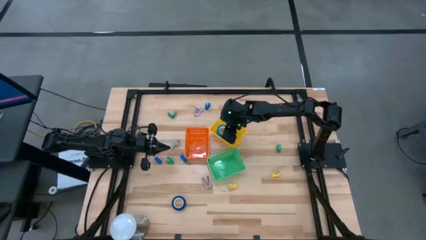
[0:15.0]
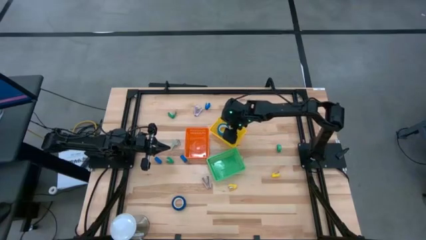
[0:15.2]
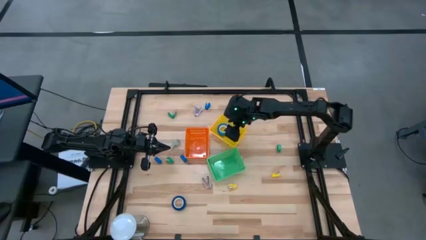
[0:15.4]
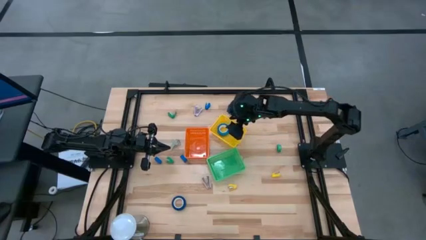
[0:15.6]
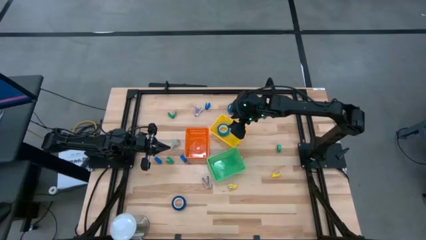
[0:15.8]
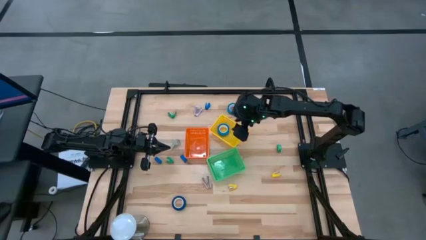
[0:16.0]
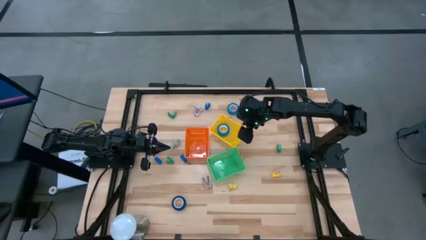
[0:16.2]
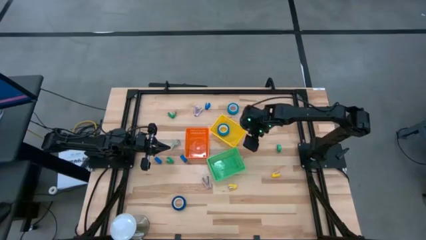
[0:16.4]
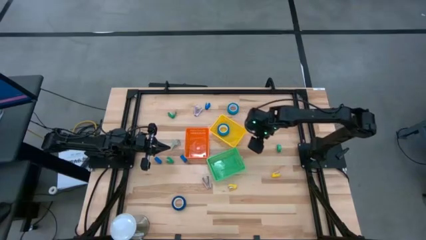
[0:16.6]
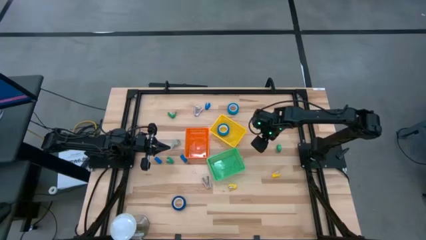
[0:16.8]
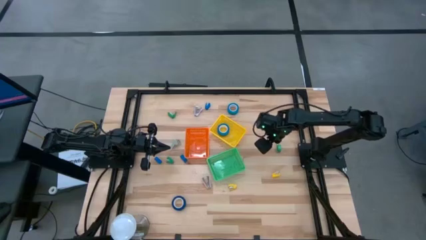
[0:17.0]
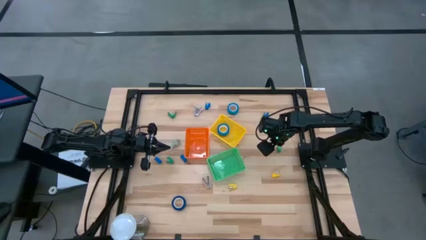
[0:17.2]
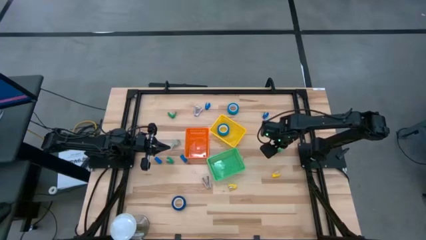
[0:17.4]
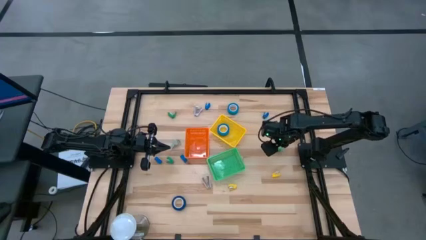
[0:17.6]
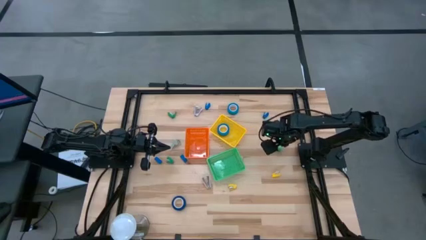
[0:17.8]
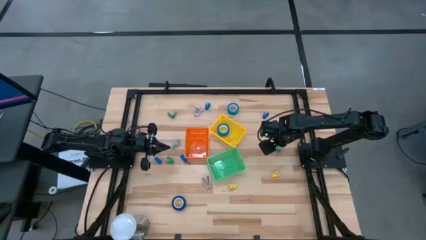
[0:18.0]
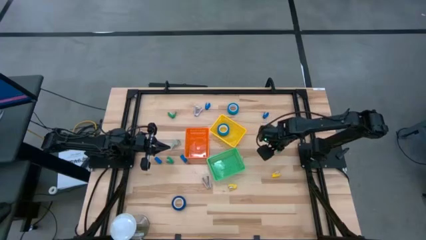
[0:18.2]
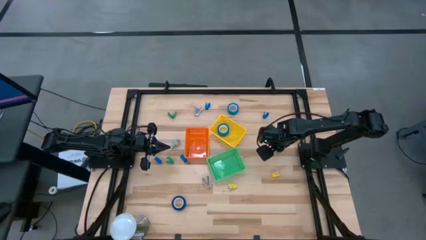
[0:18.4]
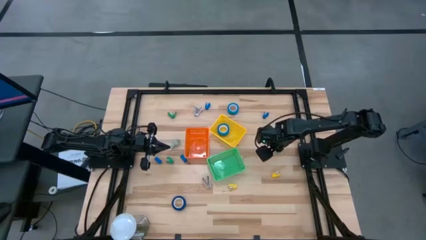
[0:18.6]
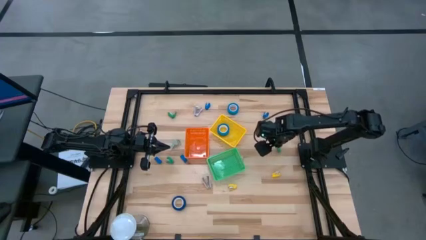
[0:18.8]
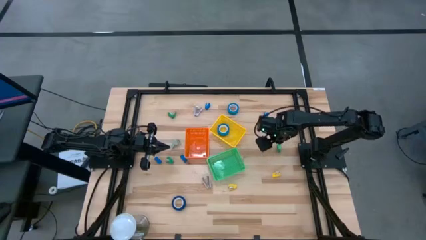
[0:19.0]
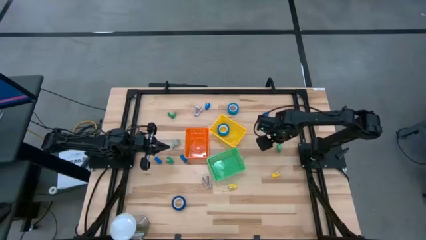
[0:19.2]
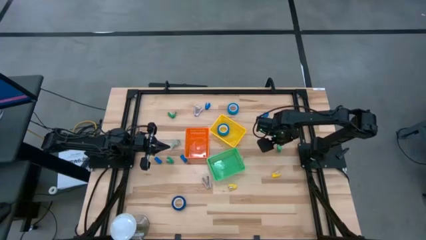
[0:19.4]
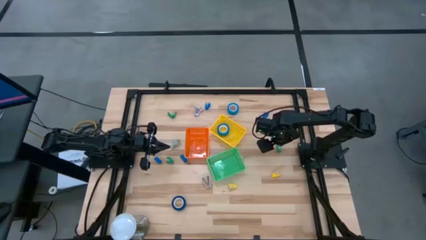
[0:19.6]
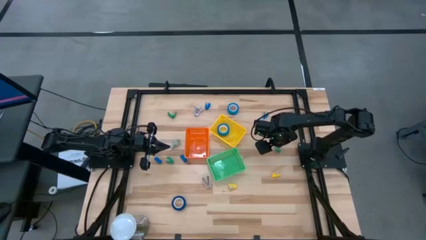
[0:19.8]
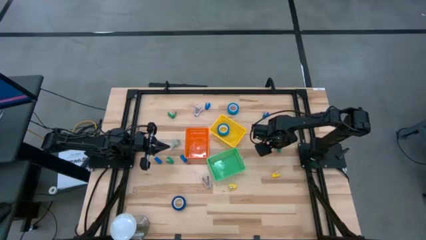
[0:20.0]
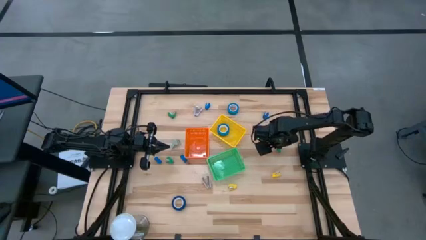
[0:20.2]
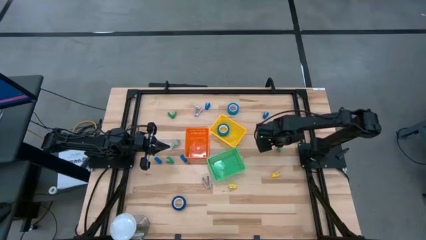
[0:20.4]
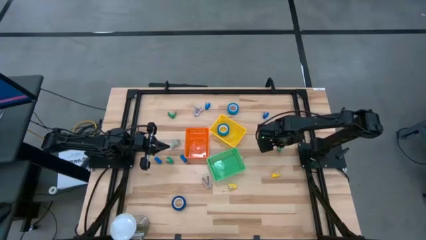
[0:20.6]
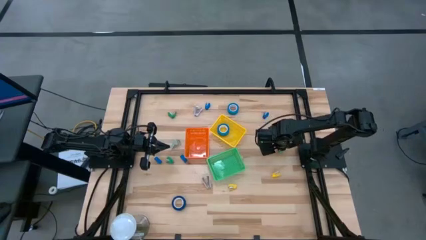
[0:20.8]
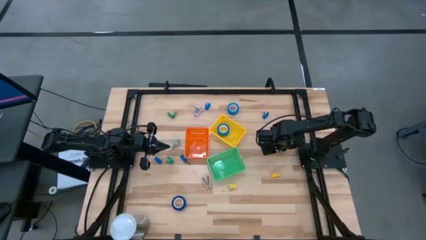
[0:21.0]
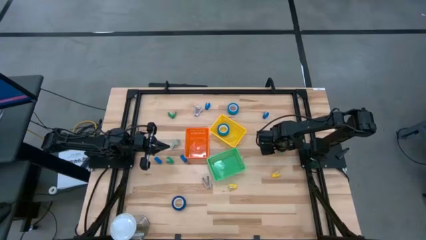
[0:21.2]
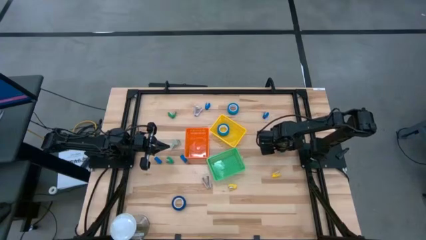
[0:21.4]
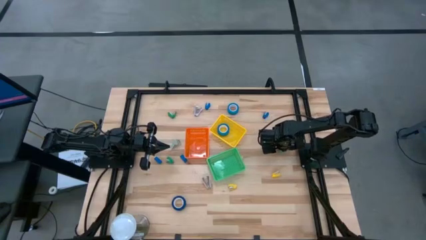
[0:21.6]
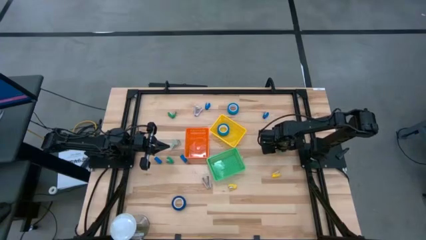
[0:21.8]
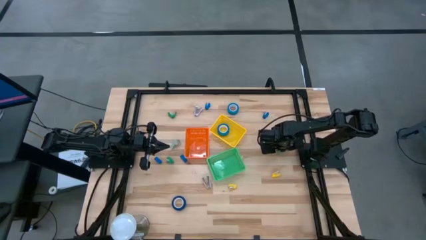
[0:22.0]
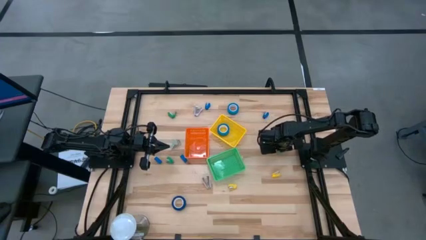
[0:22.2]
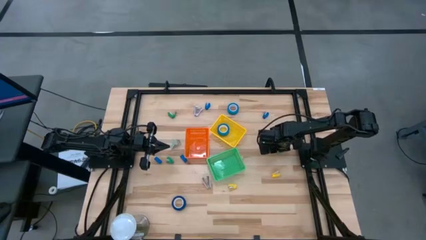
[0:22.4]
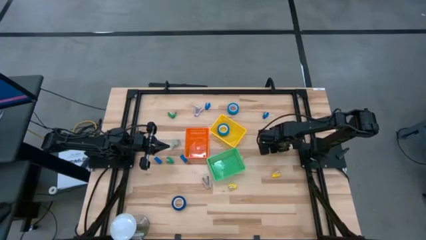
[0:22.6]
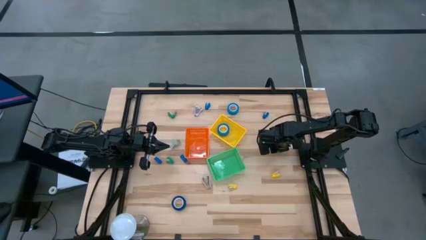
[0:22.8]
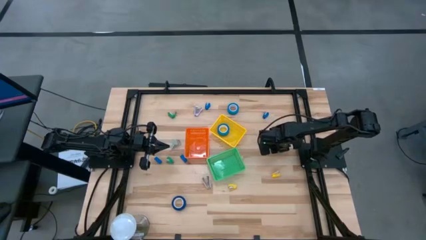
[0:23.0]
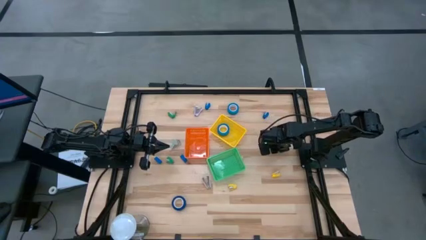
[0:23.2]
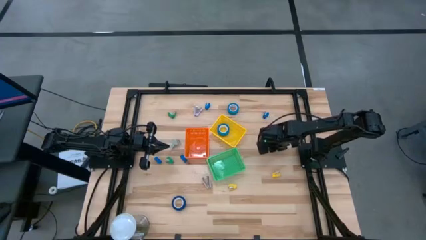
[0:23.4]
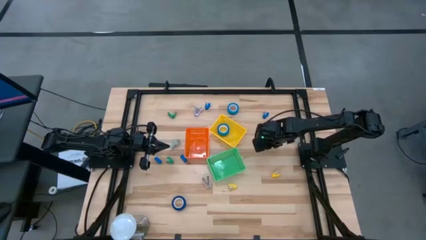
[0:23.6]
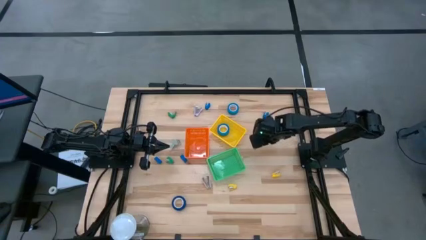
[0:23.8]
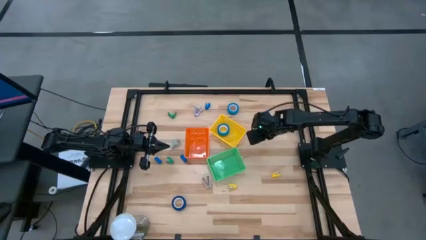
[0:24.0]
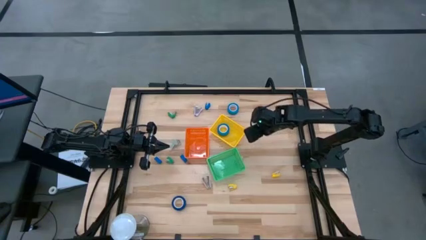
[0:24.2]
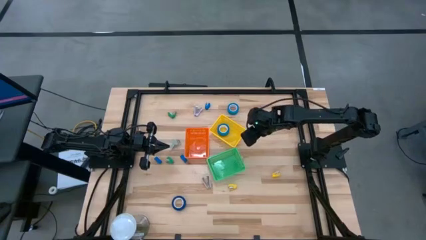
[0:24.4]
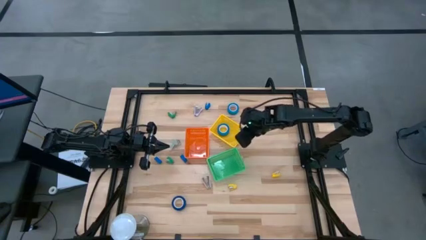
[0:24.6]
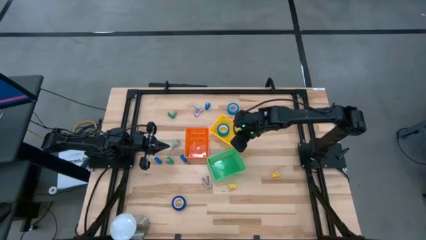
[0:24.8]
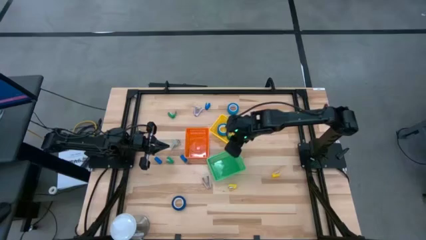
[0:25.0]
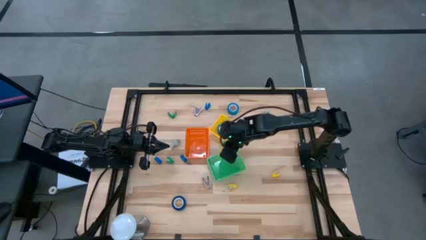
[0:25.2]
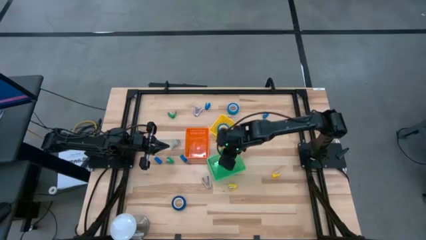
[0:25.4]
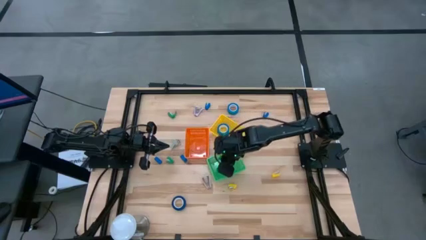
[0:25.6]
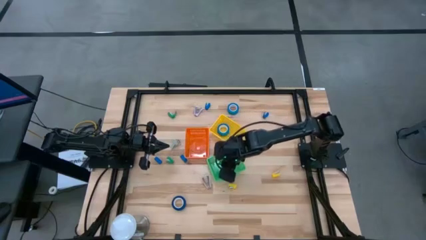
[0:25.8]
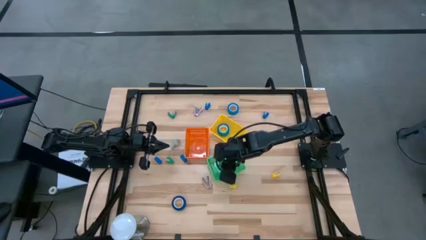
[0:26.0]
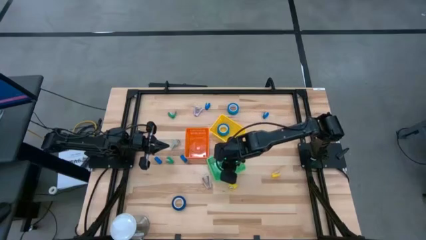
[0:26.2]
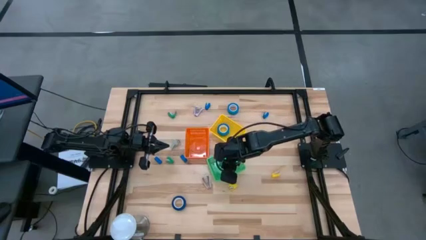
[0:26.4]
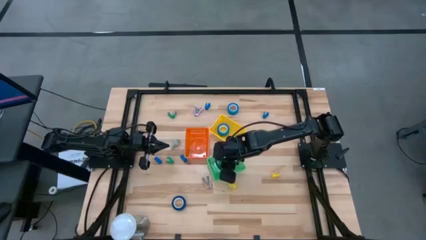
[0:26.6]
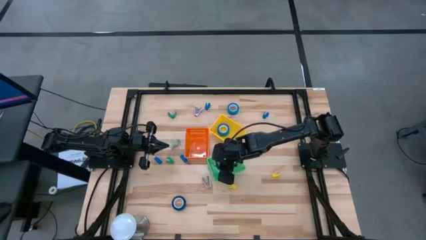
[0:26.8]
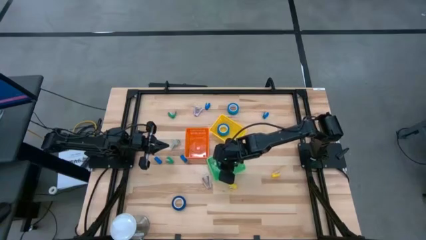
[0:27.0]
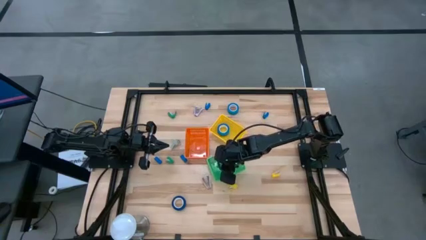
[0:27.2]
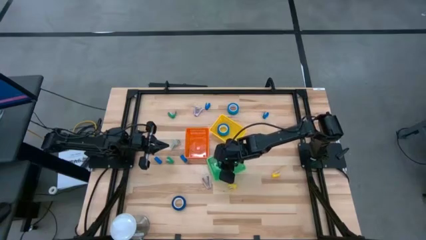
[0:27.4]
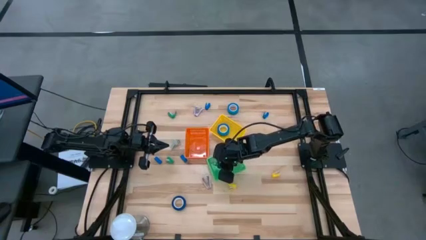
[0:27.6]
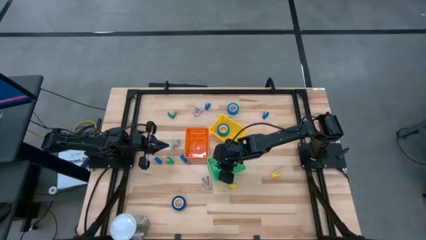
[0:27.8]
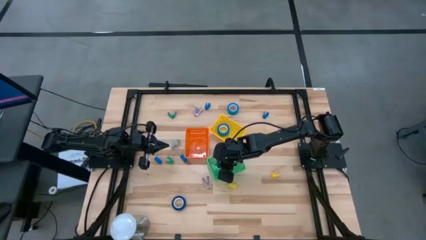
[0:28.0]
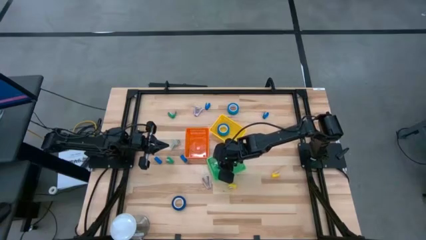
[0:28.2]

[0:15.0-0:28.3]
Task: Pick and place Stapler, Stapler remover, tape
Put the green stapler into the green bin
